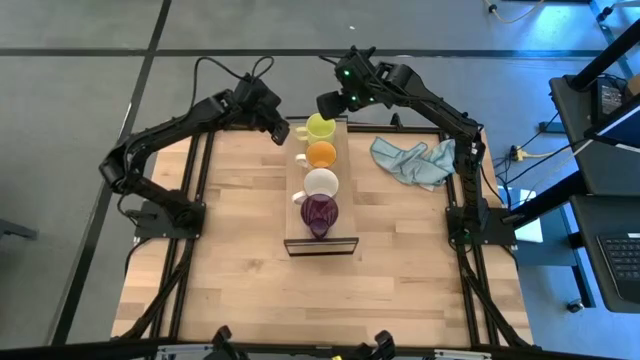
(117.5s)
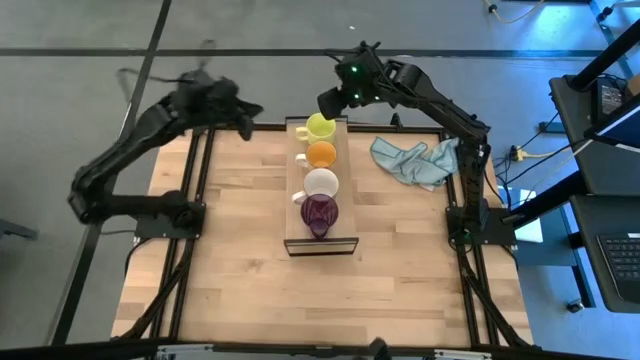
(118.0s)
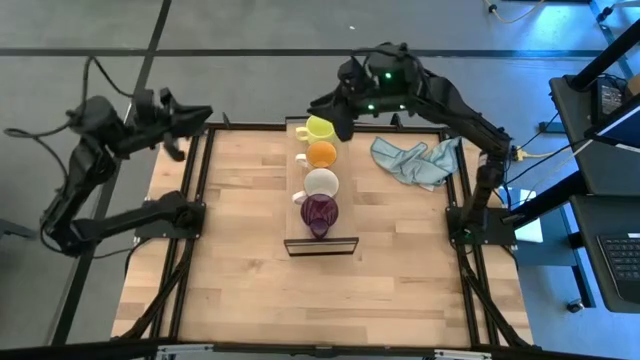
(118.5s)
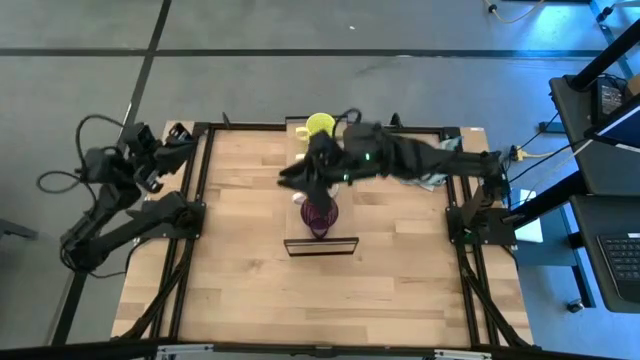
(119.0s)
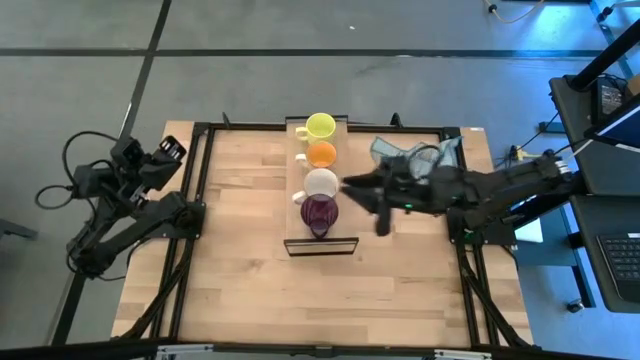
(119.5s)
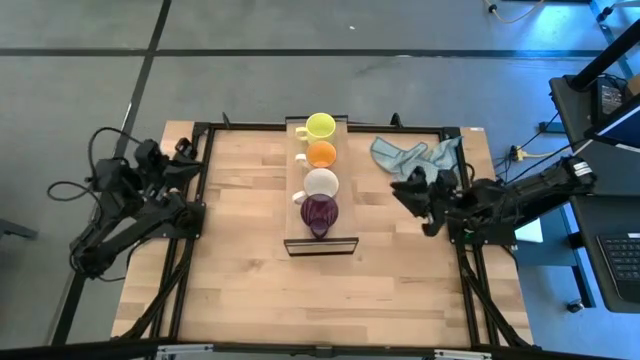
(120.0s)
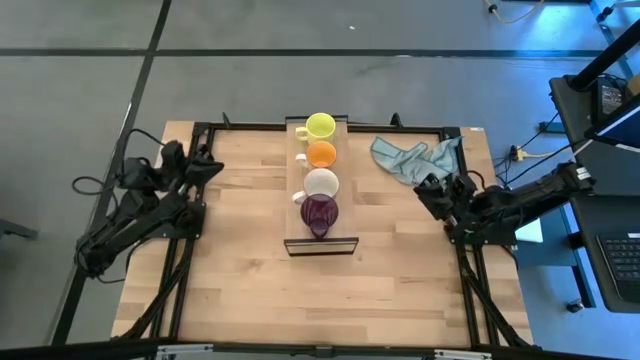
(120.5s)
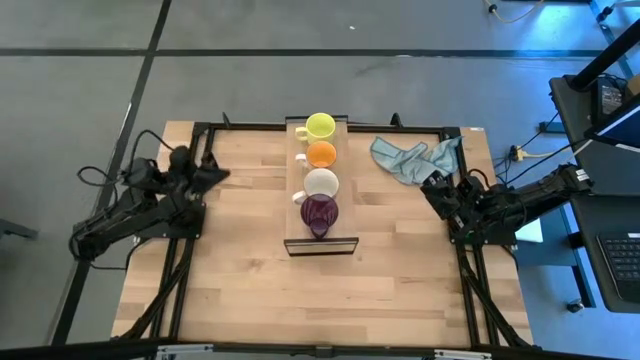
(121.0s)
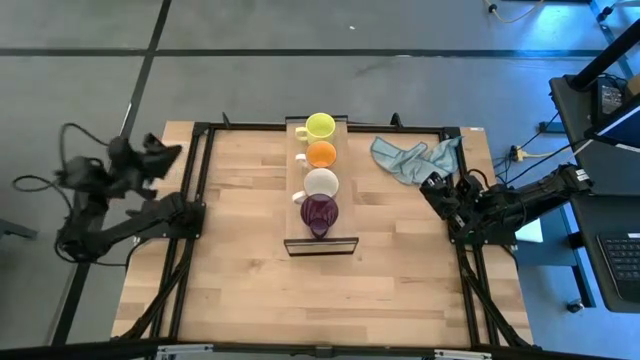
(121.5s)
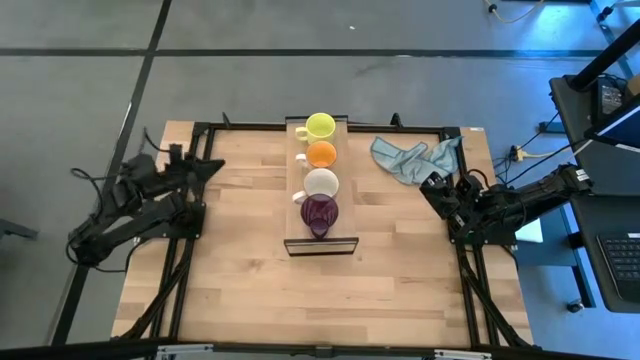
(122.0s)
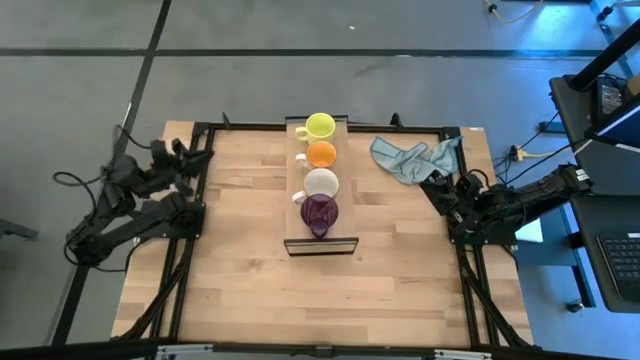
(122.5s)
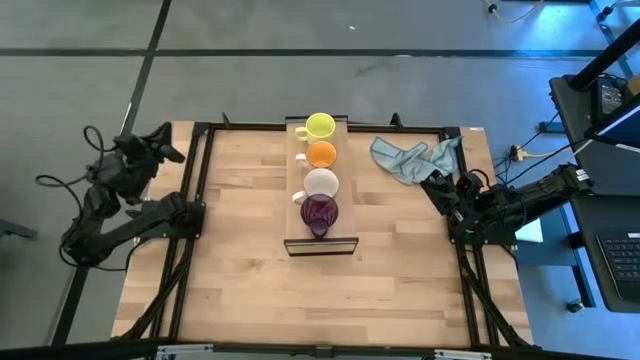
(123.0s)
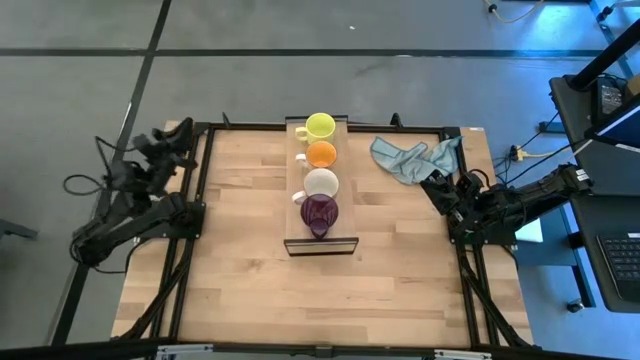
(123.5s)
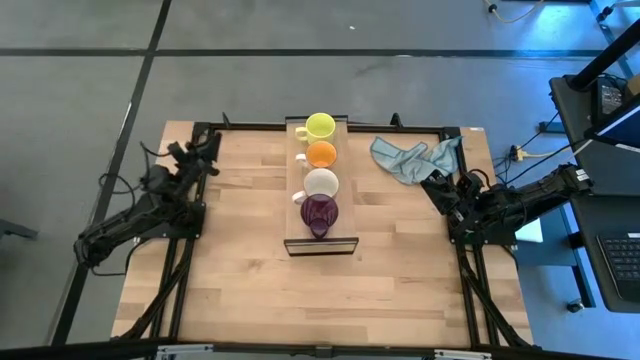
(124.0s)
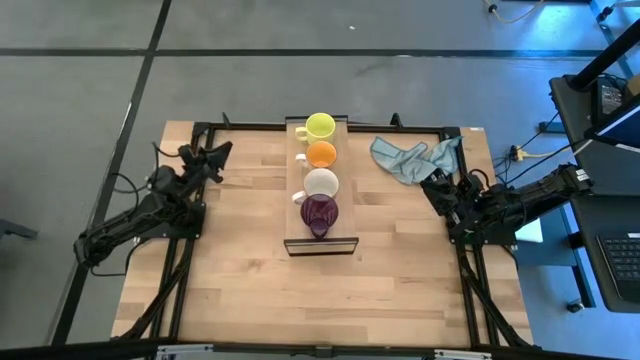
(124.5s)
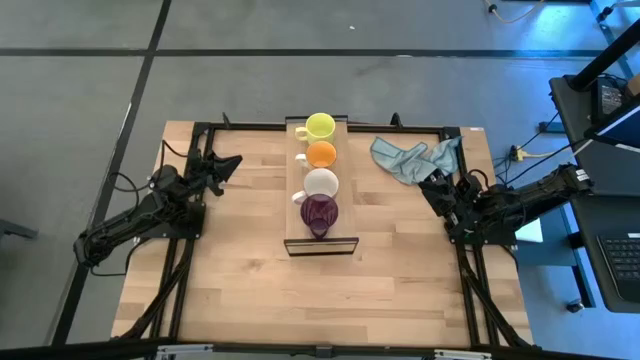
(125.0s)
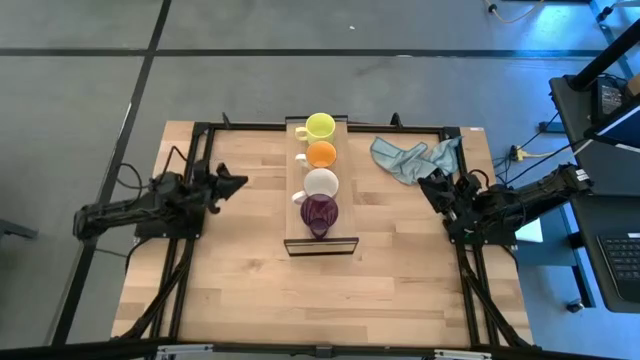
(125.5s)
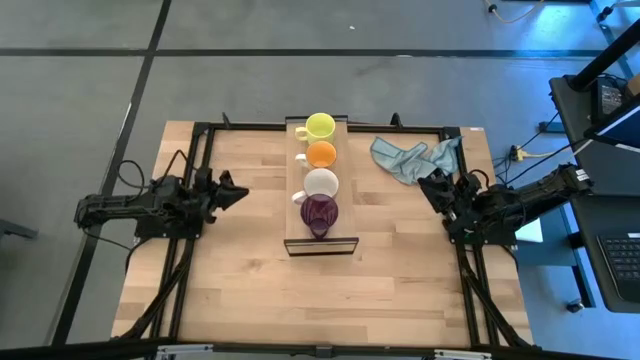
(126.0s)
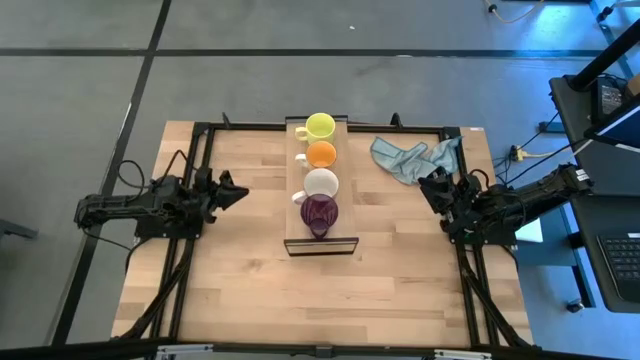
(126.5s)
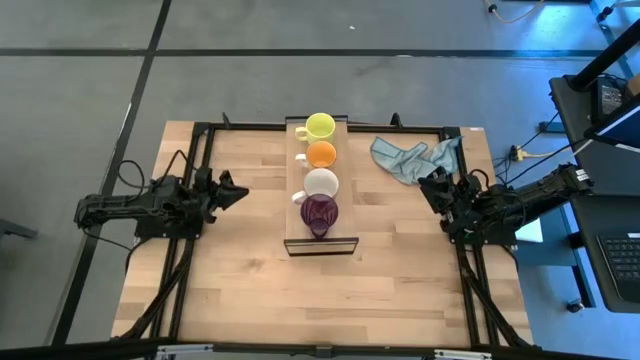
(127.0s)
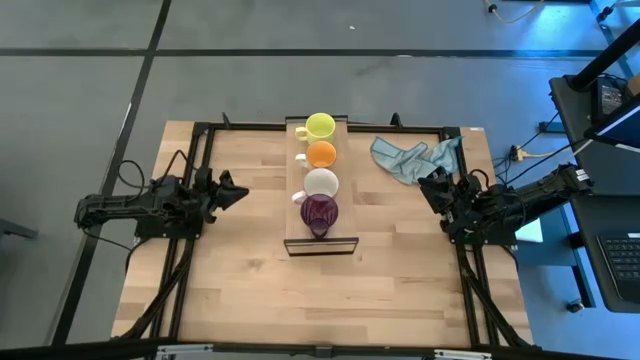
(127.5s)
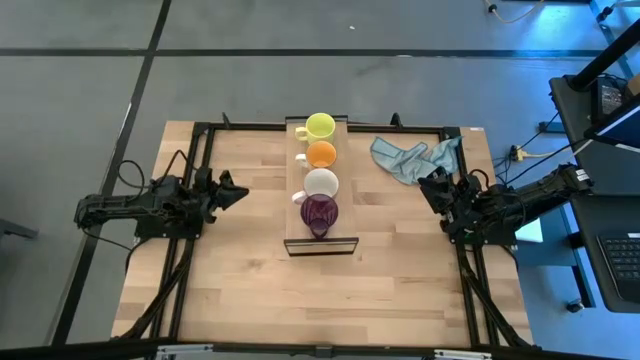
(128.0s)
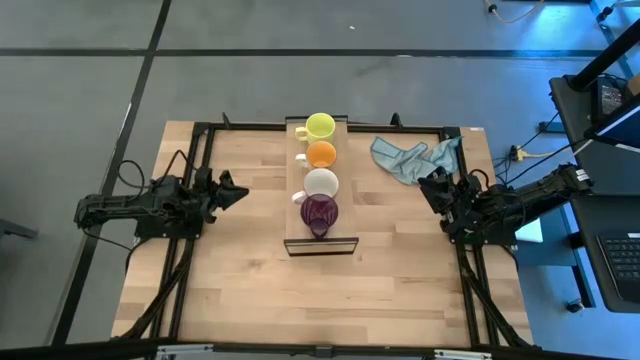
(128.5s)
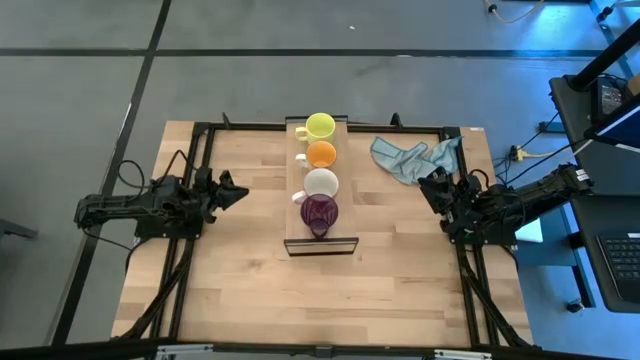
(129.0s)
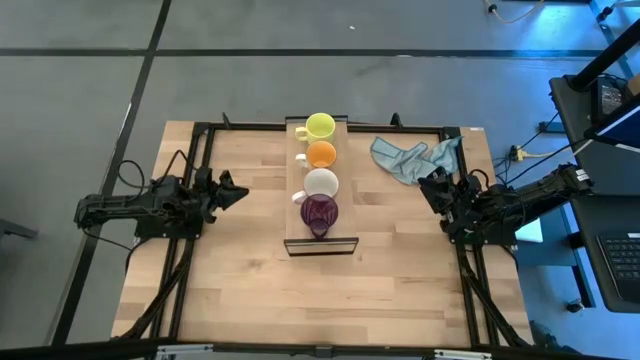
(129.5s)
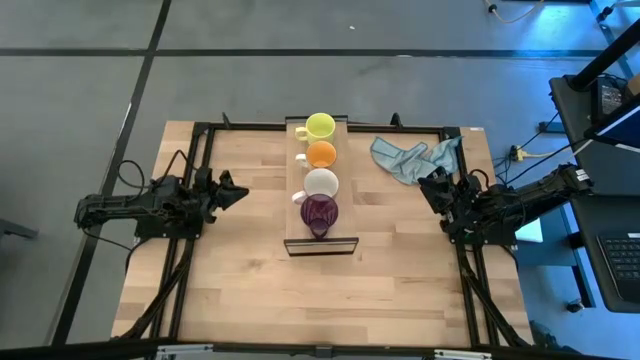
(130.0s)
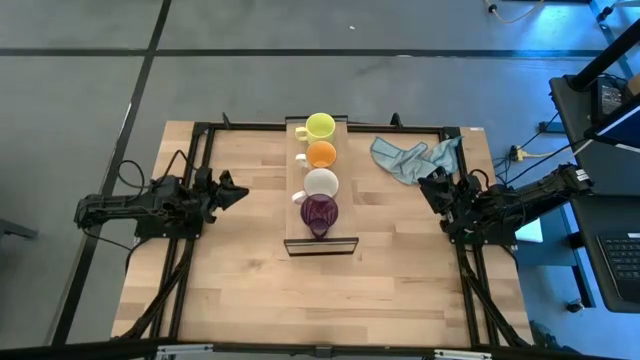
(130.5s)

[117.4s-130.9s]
Task: Stack small to large cups/mugs on shelf
Return to Home Position

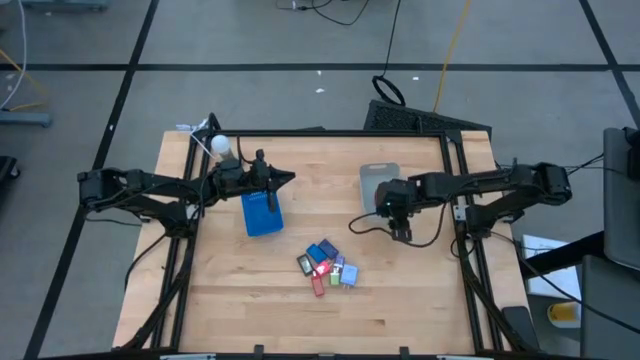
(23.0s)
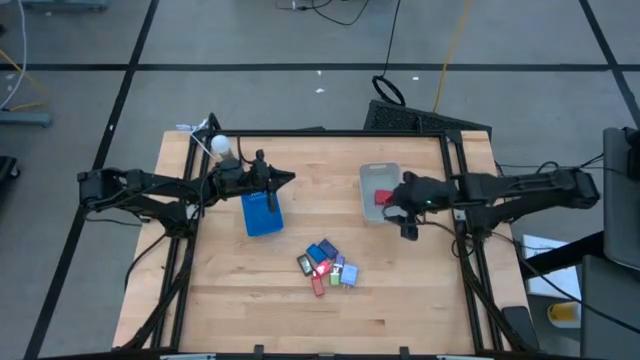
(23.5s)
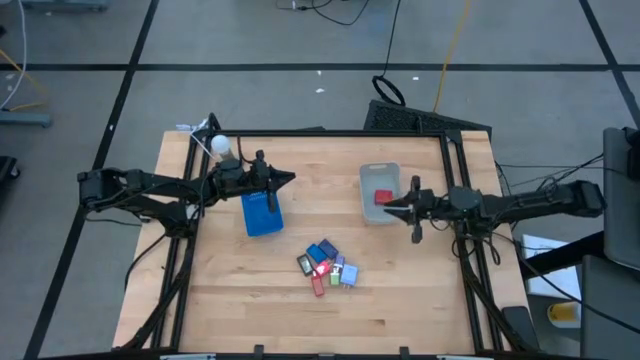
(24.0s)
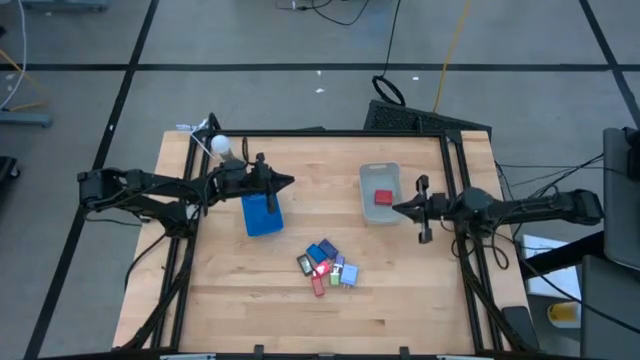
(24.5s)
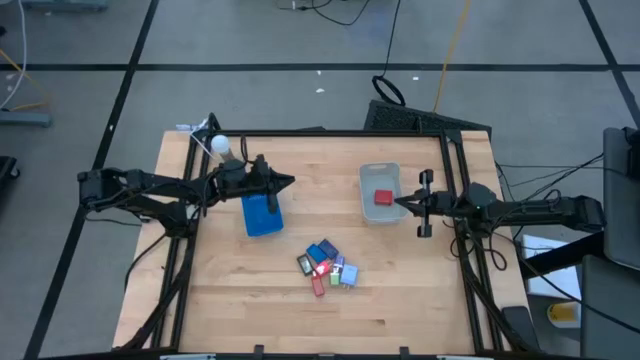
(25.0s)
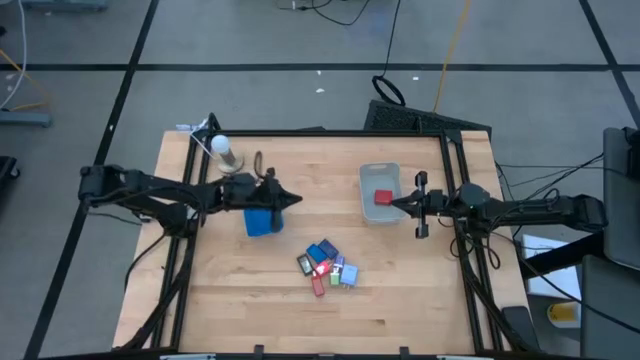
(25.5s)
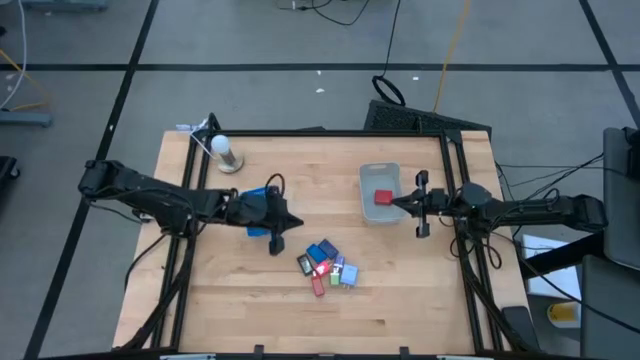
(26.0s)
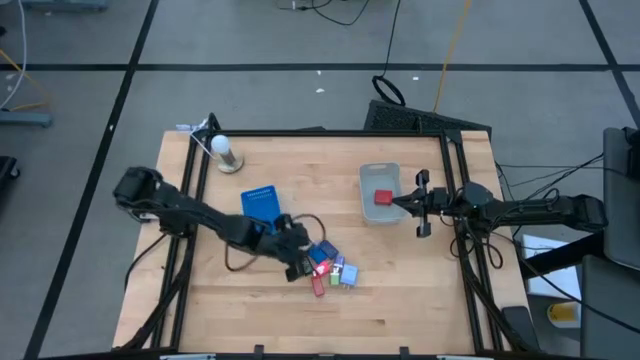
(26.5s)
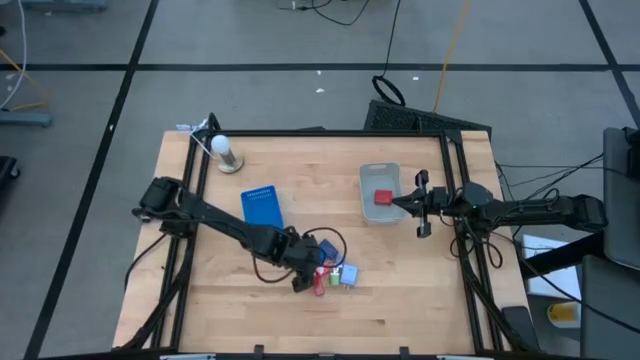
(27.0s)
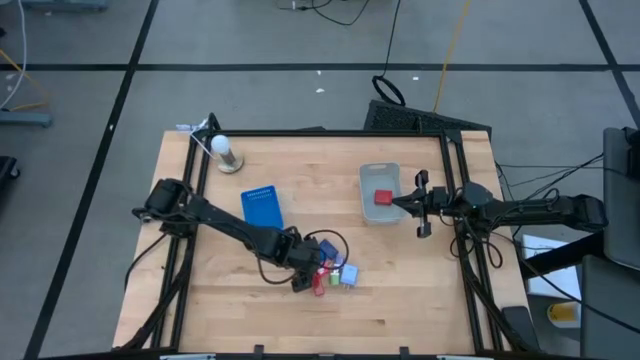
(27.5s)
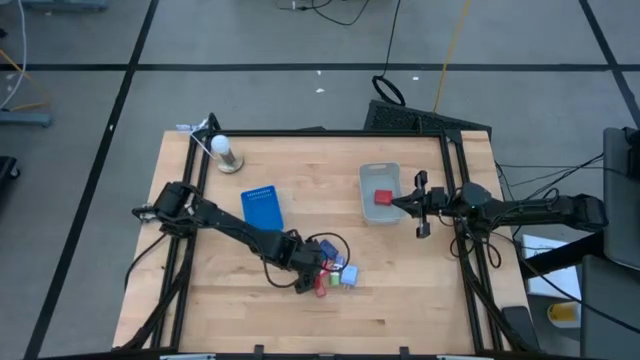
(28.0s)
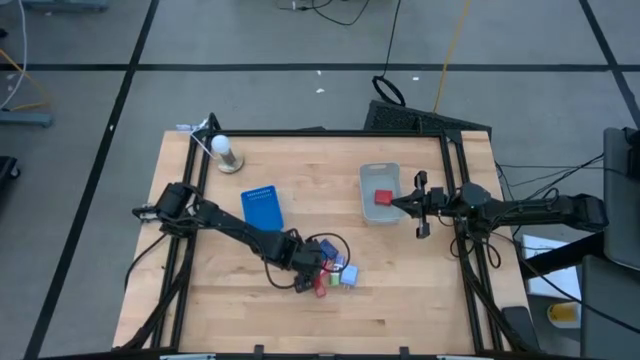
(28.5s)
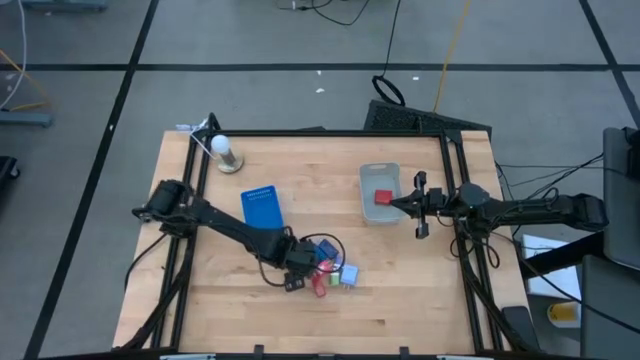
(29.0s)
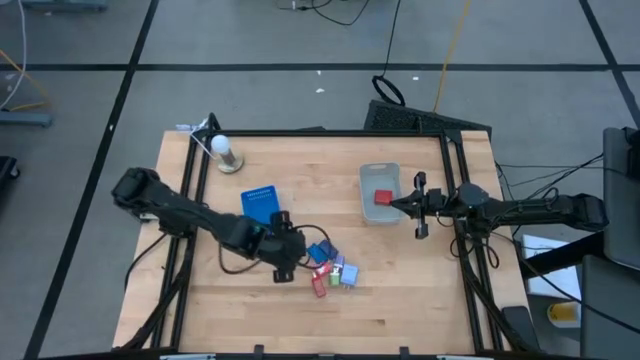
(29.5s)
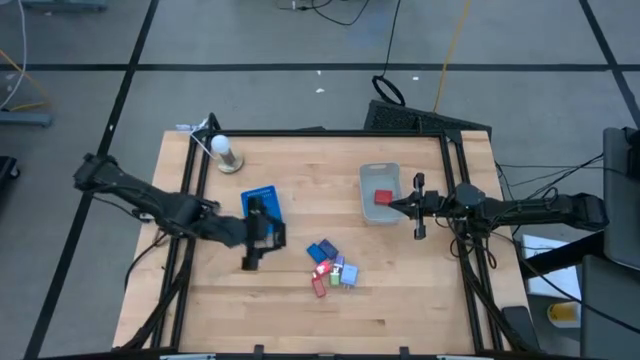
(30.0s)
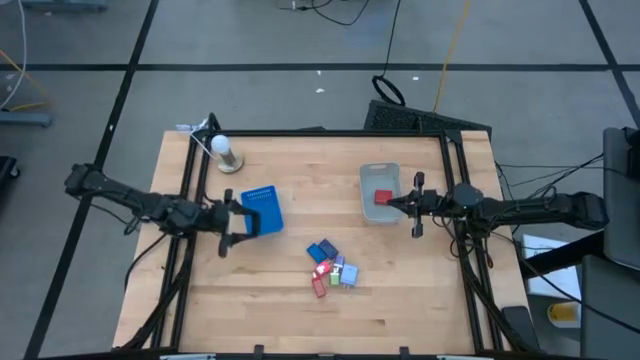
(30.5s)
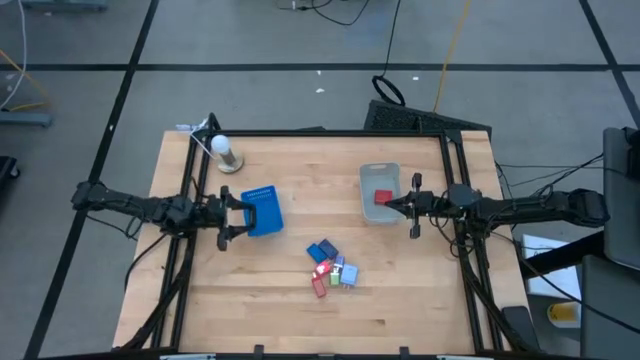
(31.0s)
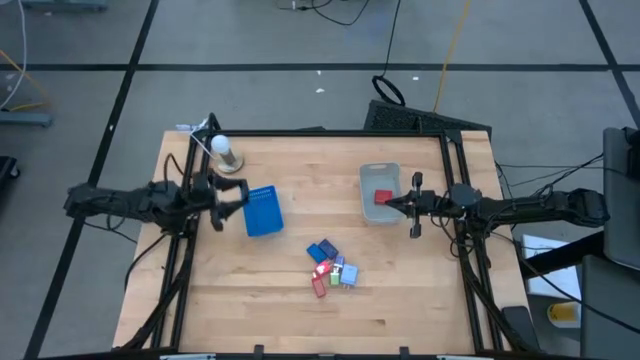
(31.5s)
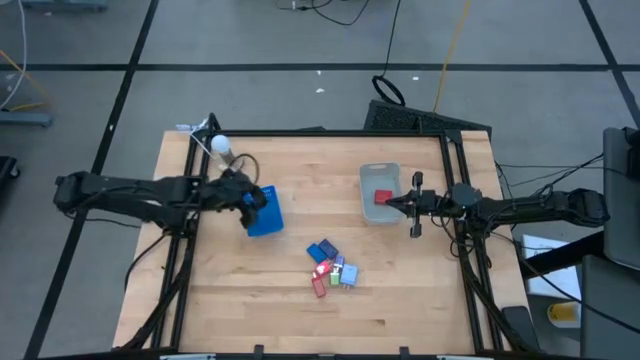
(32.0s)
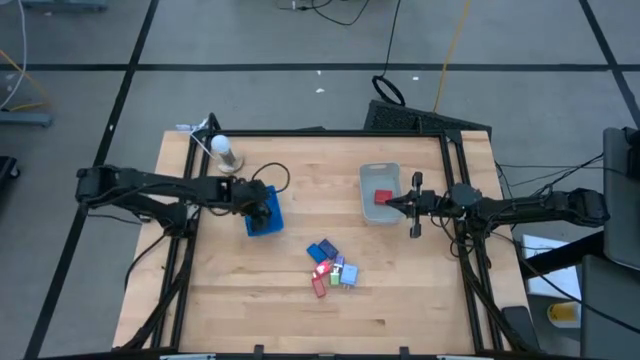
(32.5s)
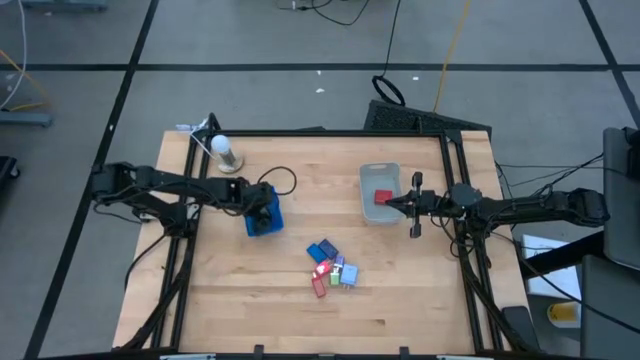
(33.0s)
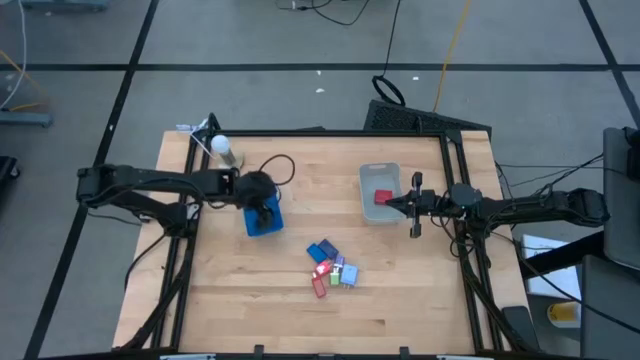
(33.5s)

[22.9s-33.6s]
Task: Pick & Place Office items
Put the black digital timer into the blue bin
